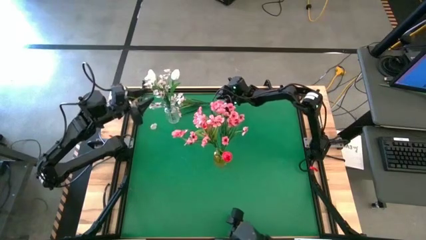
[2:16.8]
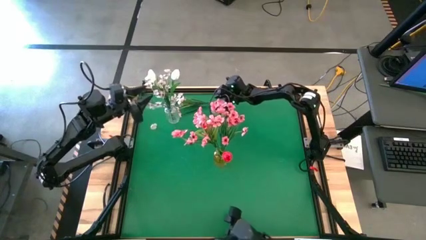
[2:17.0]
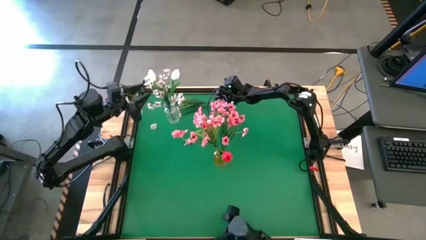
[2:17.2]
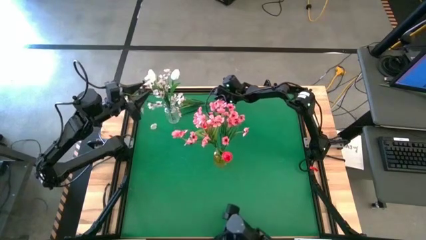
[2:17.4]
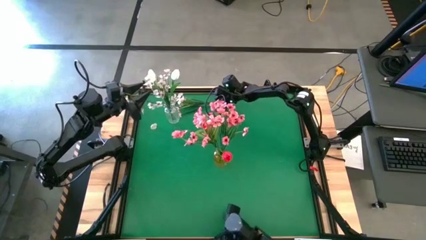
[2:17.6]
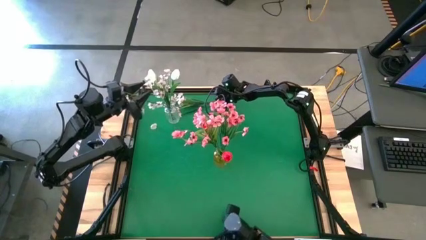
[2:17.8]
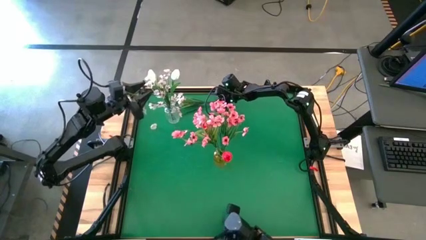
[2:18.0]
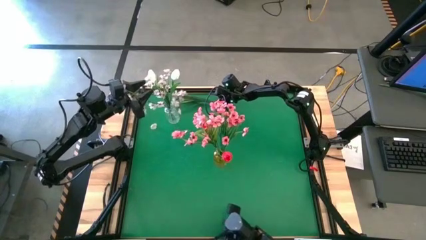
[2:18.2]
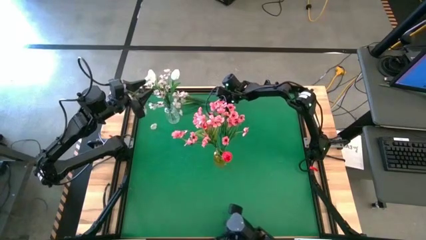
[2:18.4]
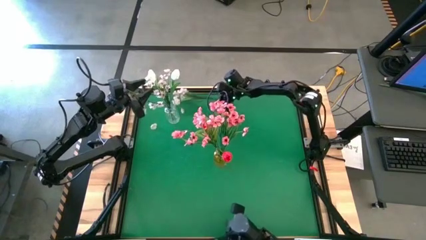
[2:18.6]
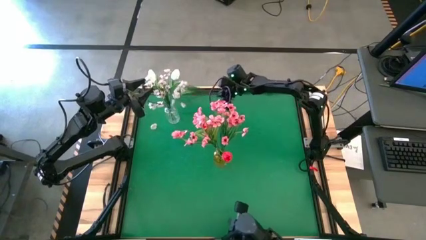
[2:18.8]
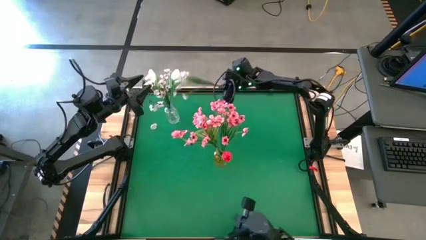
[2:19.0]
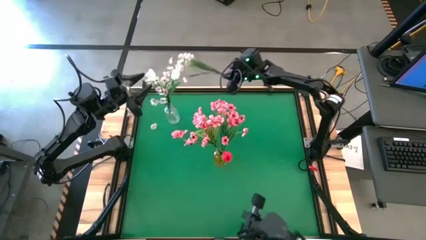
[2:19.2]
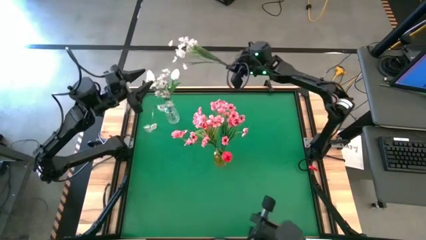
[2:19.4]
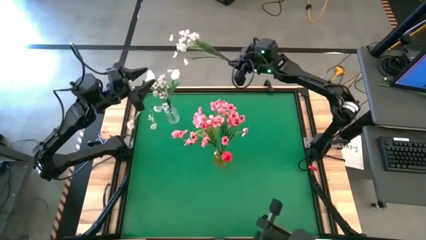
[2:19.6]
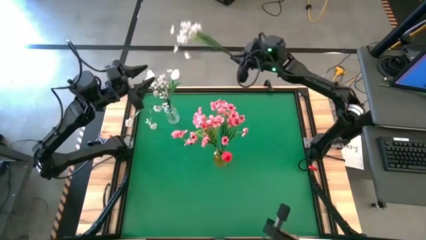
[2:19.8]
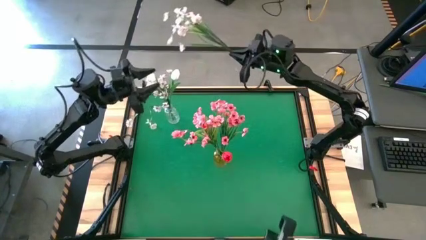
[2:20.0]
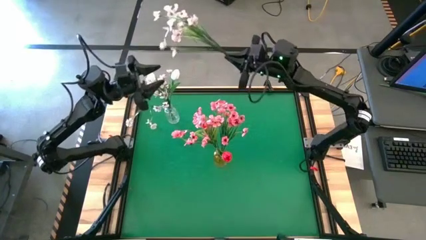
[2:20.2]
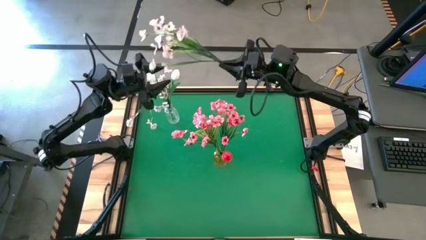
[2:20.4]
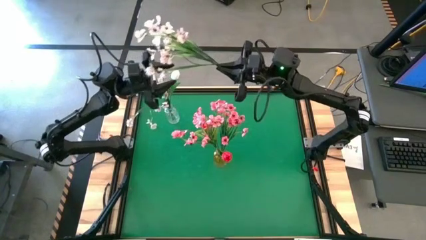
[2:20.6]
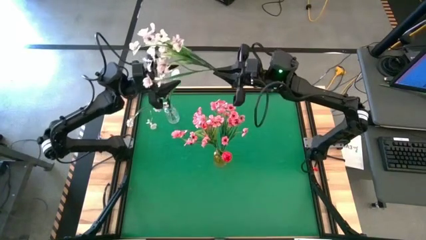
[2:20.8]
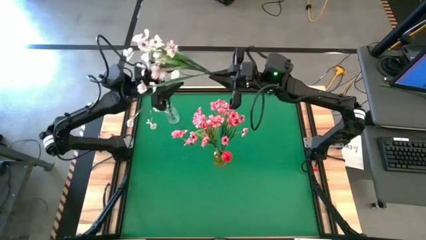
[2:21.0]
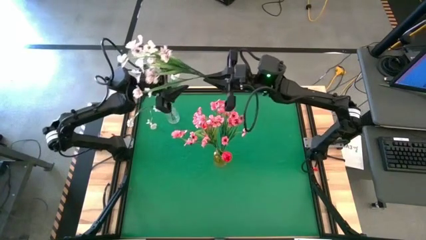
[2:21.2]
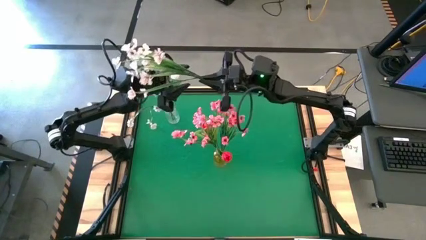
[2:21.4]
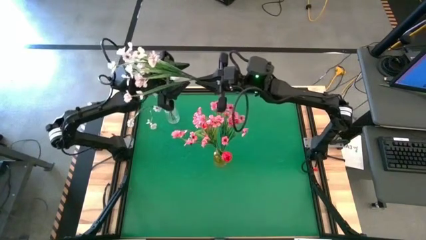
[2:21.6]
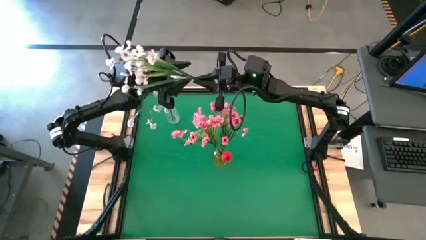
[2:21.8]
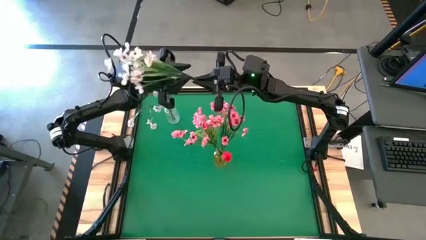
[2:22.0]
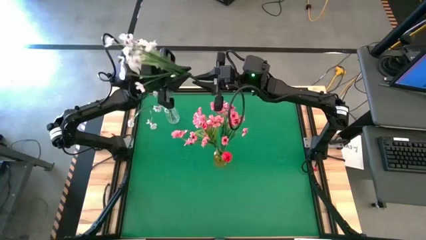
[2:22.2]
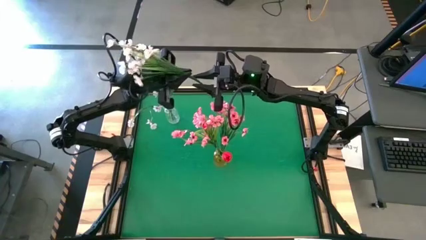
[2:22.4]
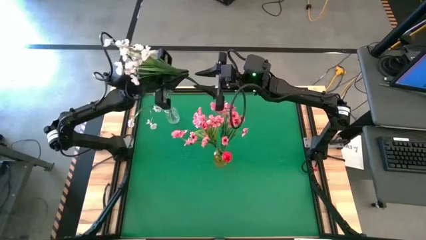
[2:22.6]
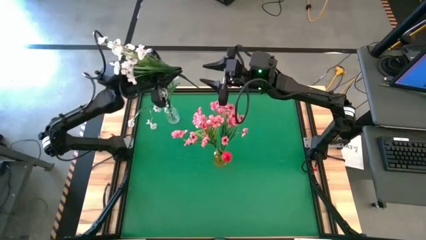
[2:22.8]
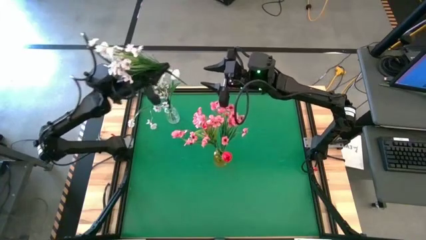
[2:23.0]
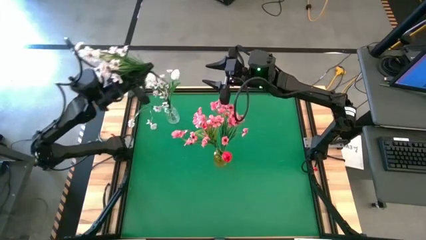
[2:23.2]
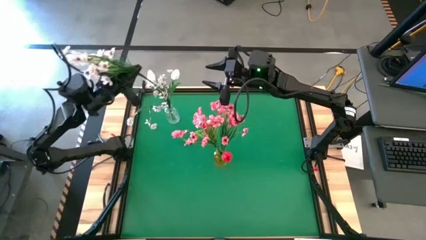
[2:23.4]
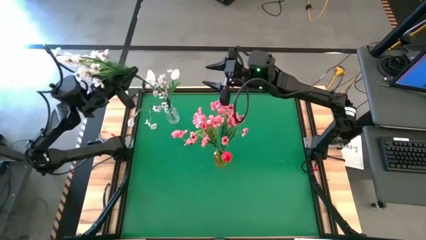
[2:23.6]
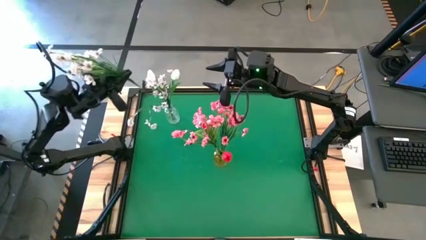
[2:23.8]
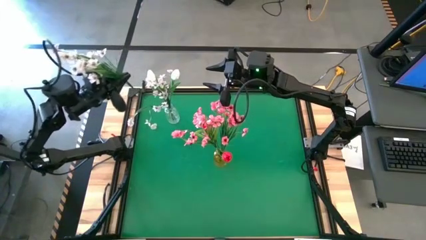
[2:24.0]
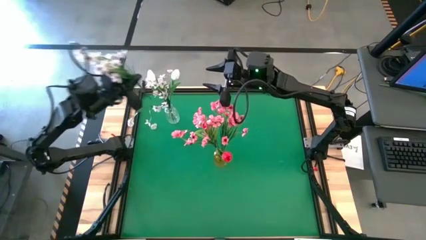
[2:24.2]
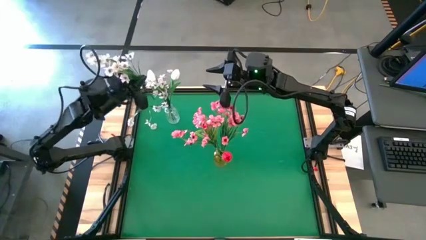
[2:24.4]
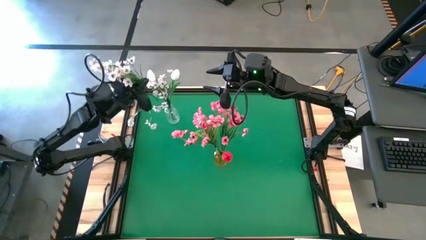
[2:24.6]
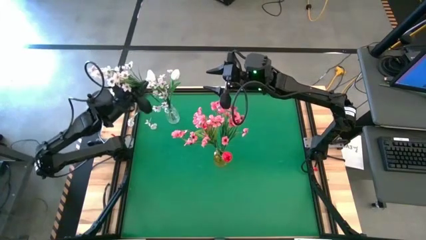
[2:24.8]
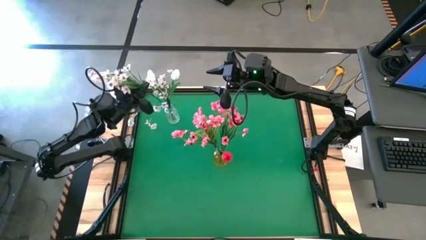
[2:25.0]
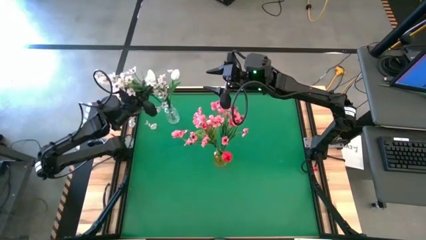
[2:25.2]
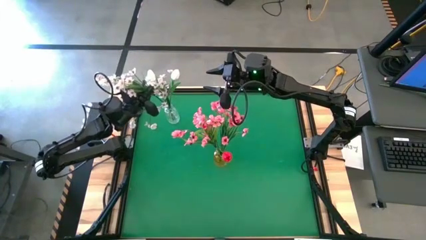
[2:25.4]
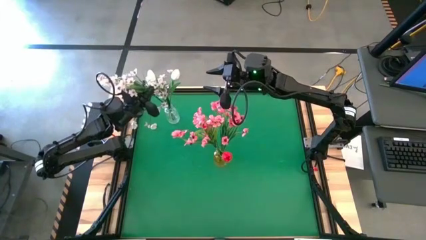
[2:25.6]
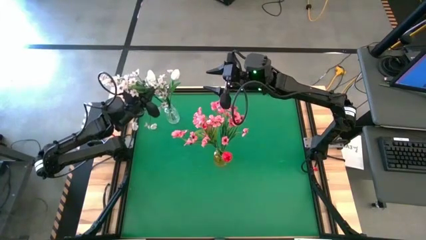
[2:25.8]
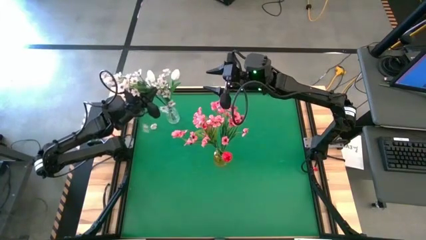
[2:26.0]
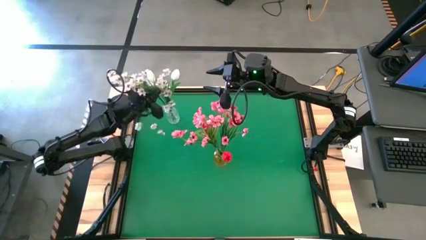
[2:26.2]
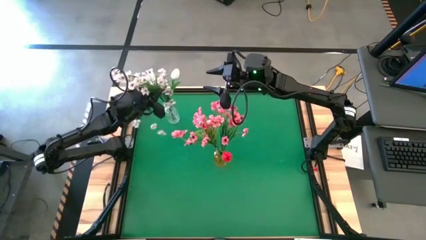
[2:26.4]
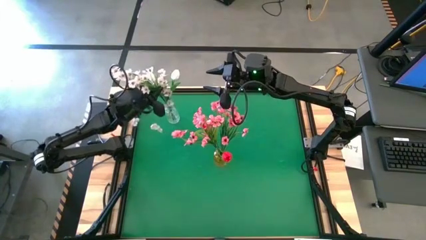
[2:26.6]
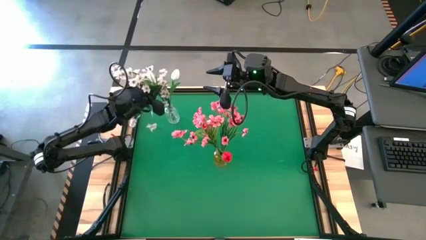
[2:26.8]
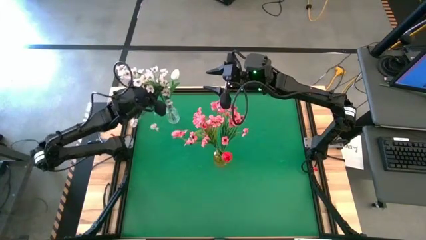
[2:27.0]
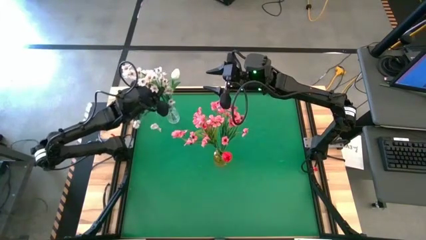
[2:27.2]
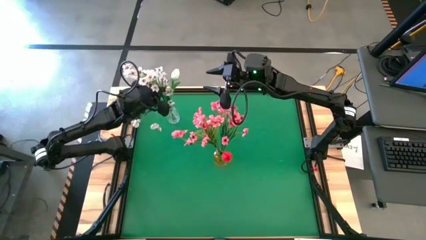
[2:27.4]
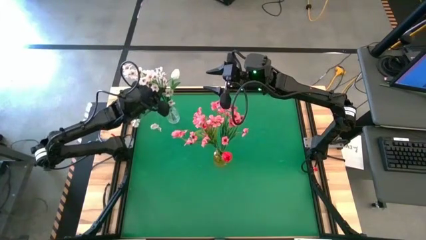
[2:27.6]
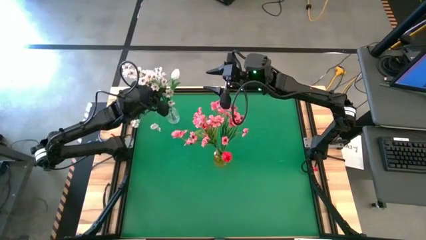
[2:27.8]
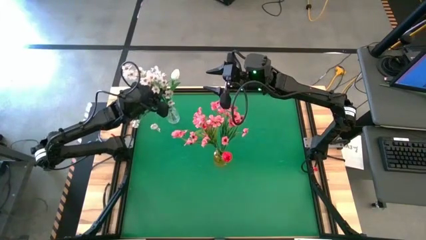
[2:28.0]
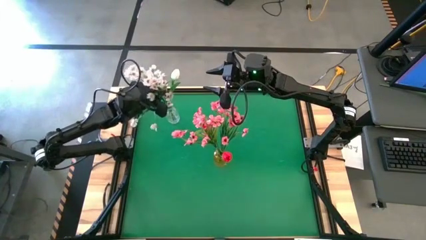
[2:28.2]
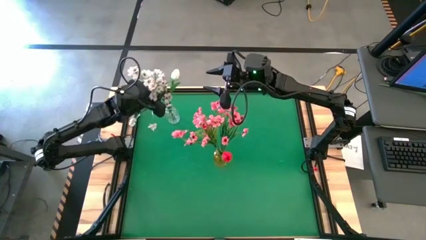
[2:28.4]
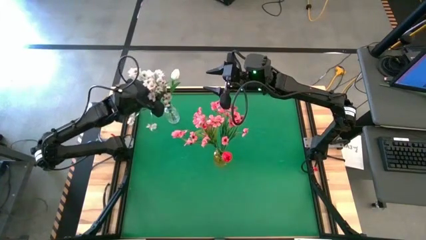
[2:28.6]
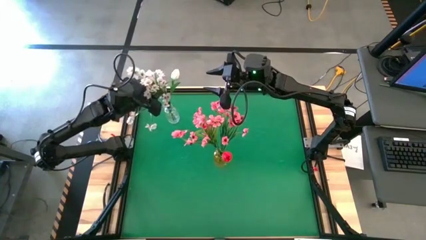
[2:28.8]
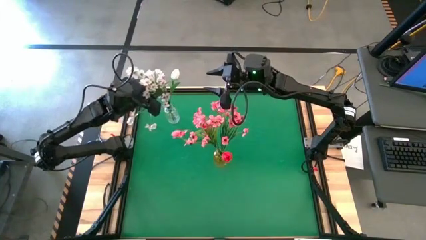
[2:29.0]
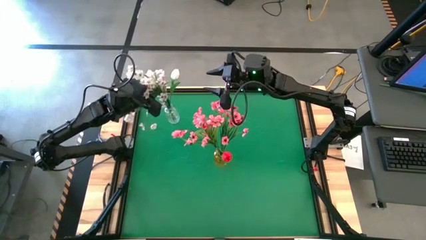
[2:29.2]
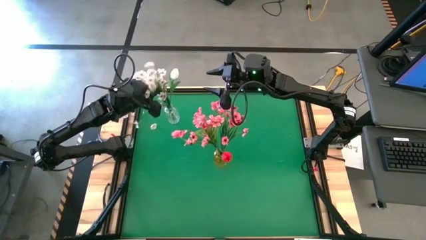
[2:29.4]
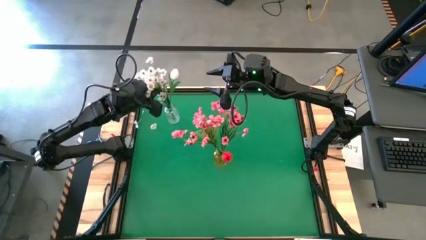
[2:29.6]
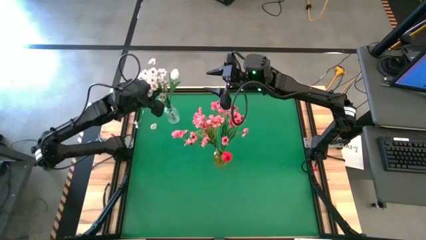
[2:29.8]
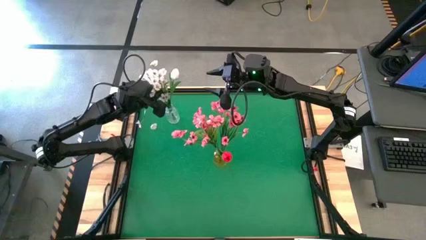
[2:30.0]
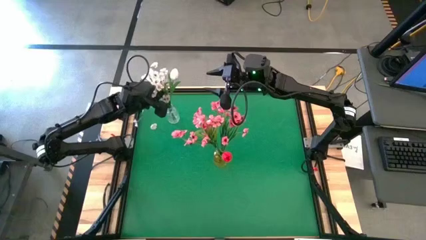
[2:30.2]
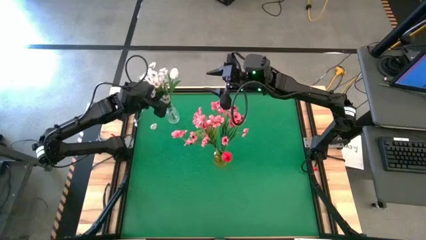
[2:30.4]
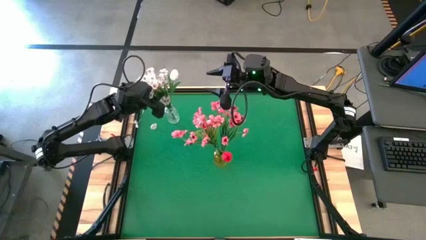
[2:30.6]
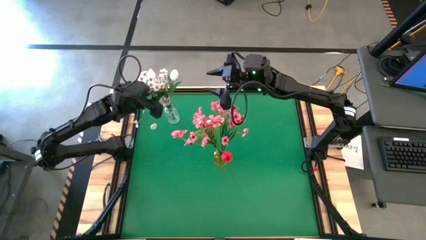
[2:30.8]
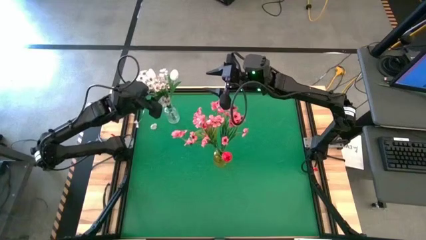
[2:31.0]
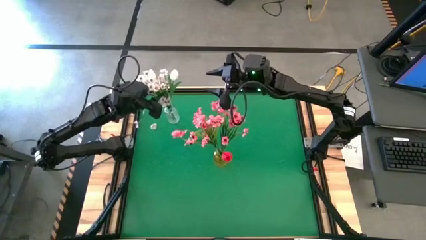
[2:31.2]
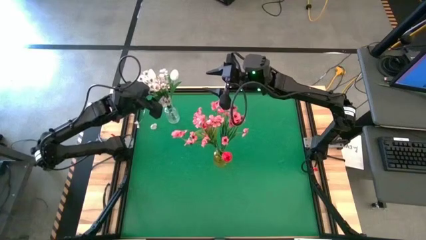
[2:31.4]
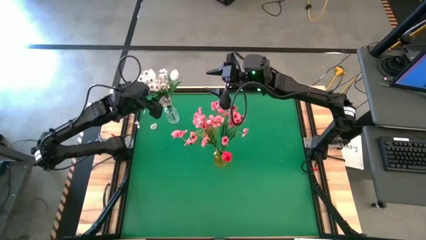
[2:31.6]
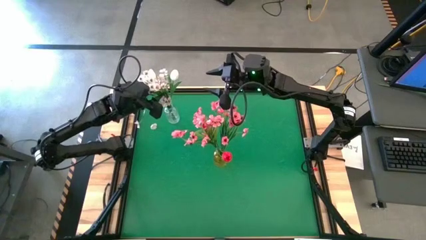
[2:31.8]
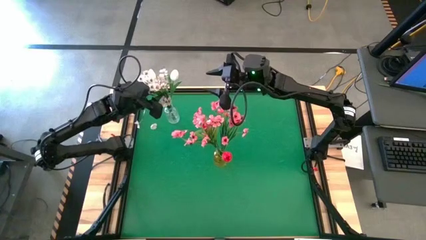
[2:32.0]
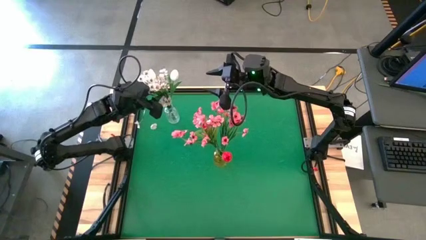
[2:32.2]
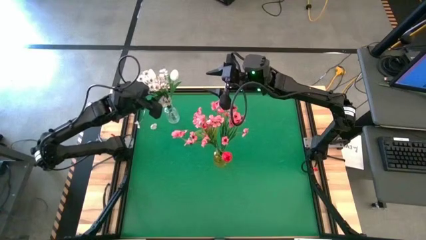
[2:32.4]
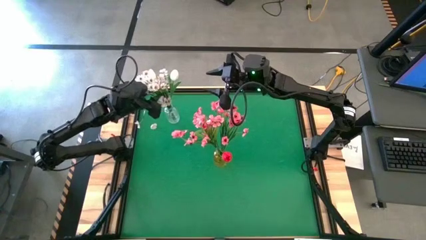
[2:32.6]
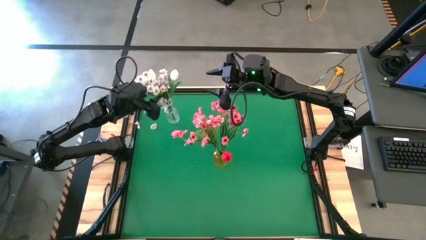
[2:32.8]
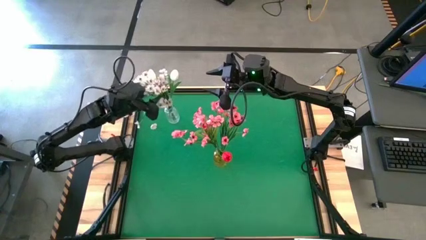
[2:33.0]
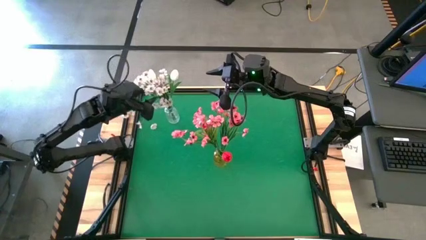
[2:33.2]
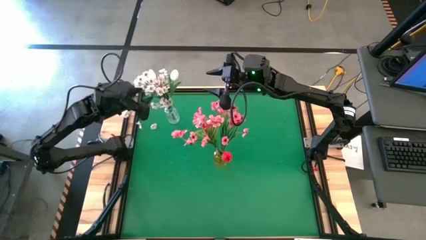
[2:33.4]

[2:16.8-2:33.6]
Task: Sort flowers into vase by color
Put the white flower into the transparent vase

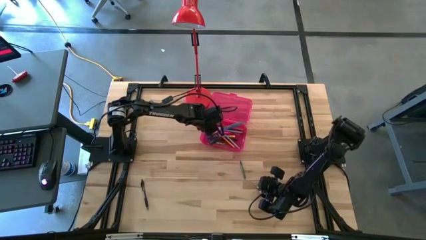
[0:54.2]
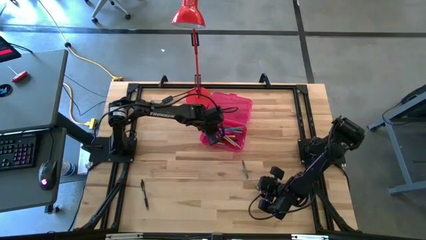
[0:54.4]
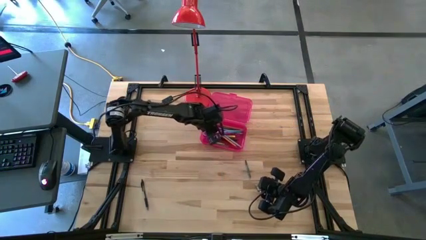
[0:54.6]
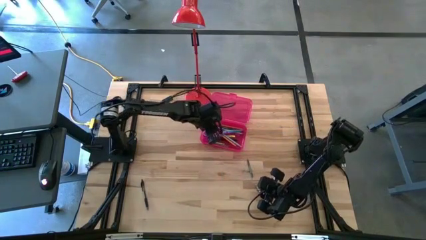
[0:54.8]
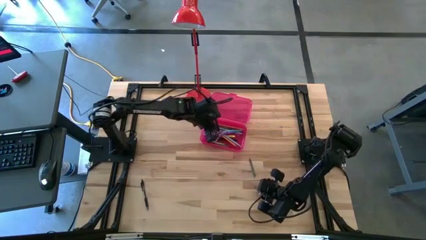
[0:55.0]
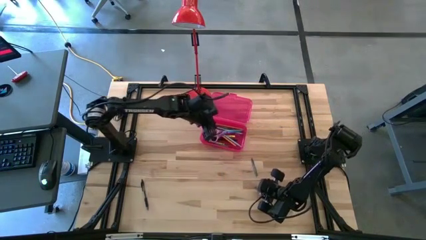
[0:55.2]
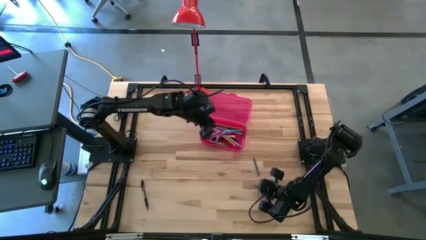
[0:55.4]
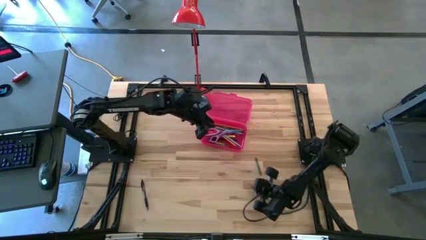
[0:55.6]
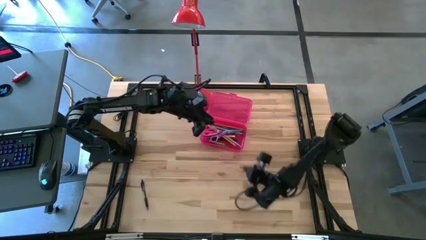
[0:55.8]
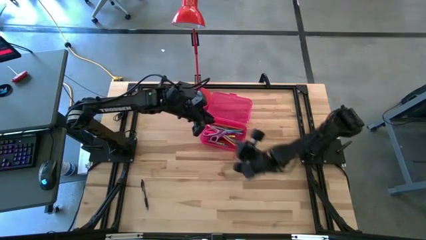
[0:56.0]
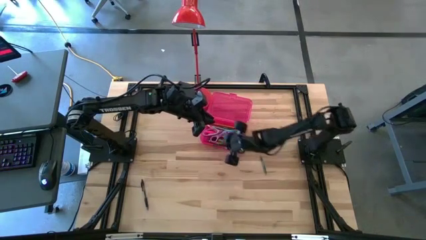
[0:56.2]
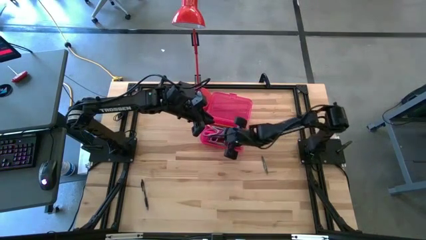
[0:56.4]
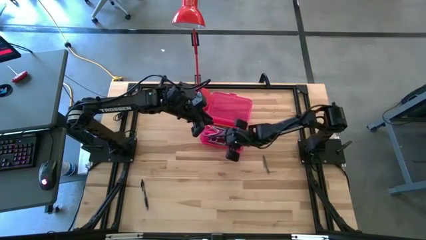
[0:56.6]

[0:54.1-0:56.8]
Task: Pick & place school supplies into a supply box
Put the green crayon into the pink supply box
